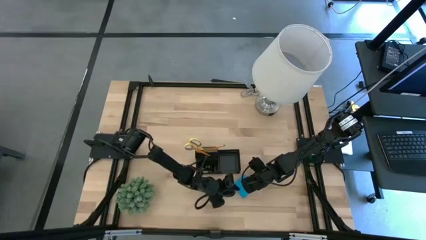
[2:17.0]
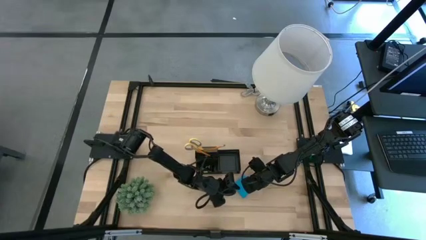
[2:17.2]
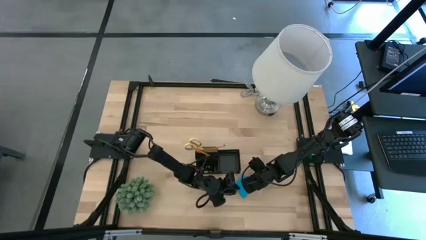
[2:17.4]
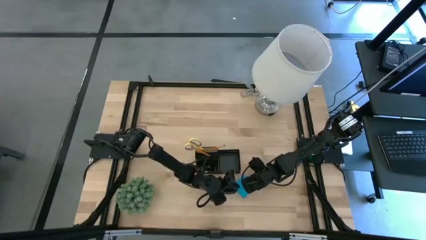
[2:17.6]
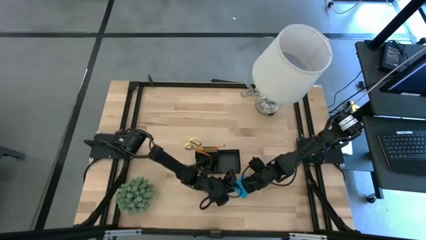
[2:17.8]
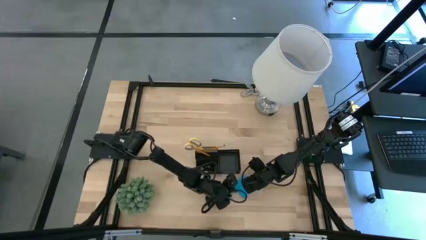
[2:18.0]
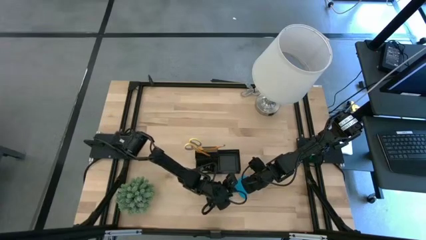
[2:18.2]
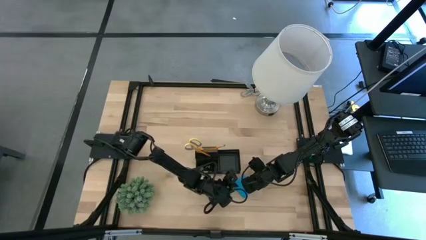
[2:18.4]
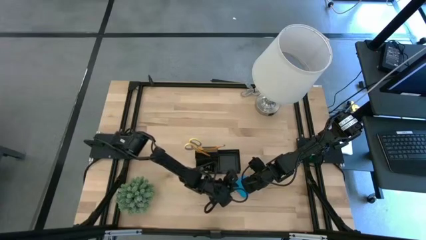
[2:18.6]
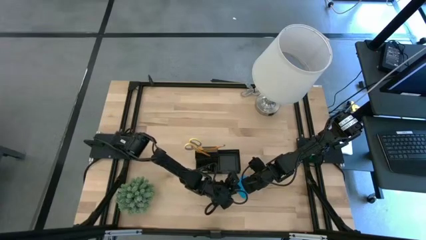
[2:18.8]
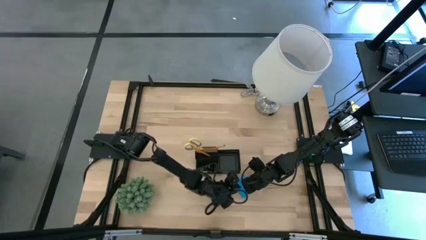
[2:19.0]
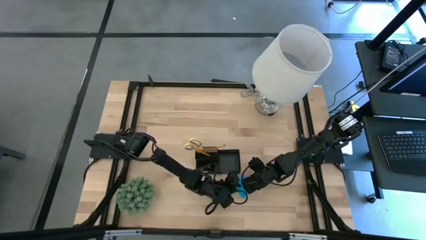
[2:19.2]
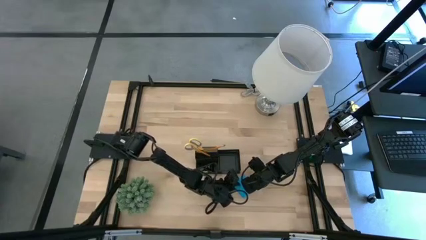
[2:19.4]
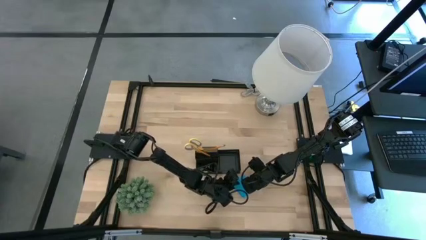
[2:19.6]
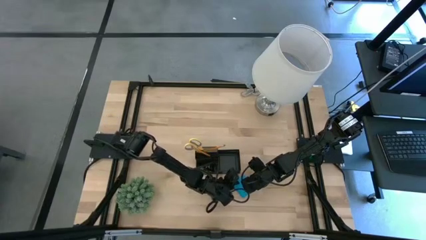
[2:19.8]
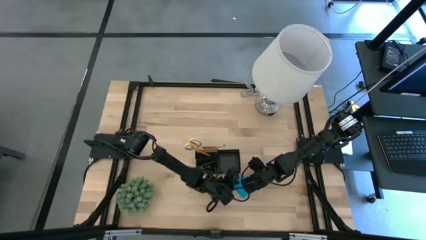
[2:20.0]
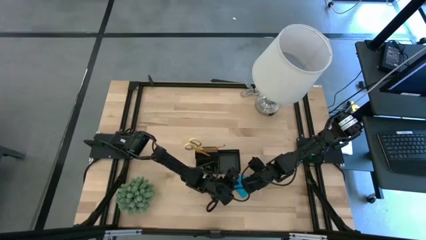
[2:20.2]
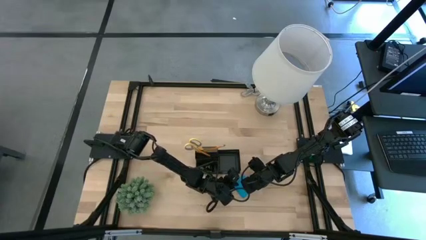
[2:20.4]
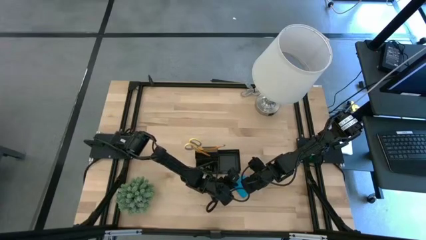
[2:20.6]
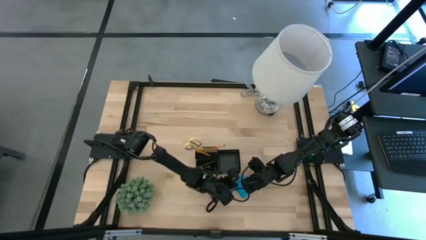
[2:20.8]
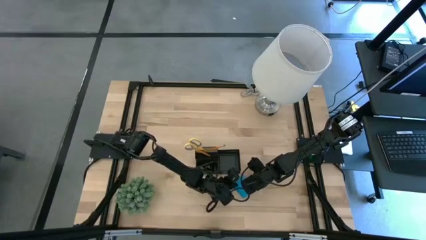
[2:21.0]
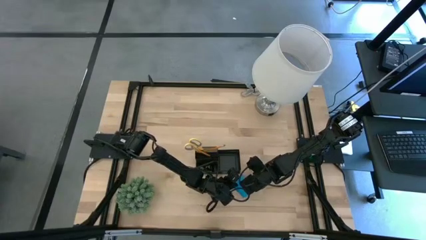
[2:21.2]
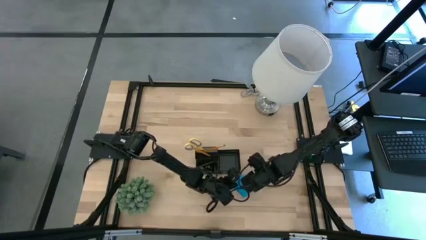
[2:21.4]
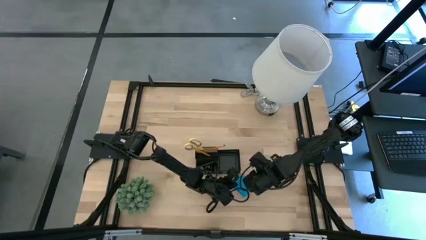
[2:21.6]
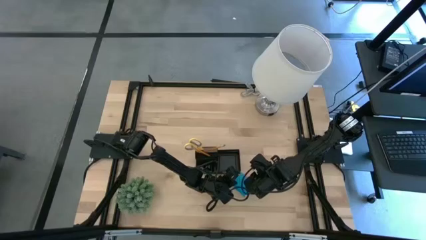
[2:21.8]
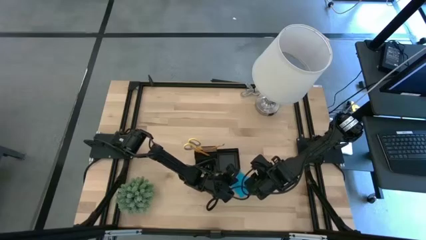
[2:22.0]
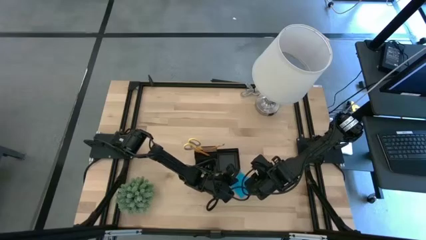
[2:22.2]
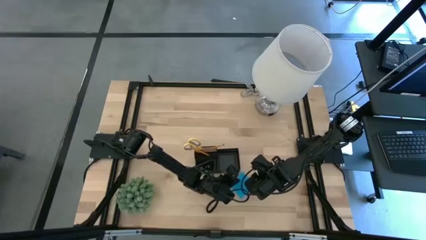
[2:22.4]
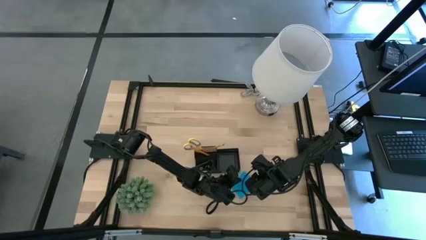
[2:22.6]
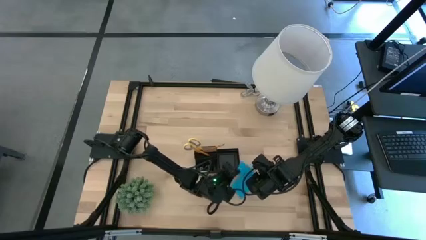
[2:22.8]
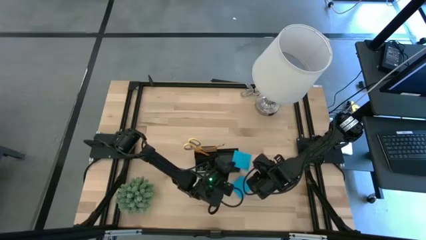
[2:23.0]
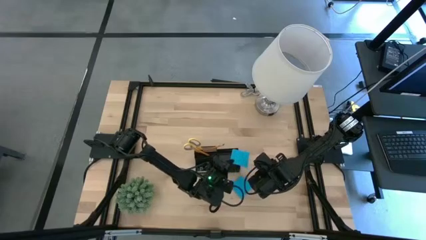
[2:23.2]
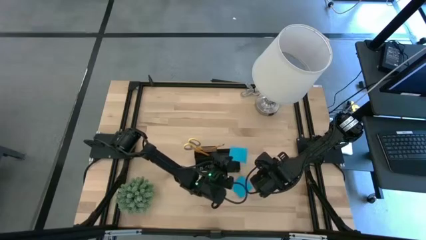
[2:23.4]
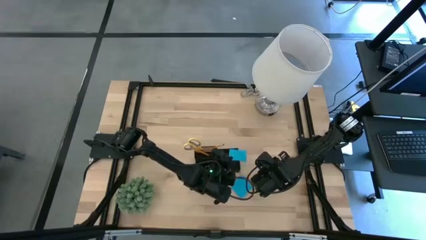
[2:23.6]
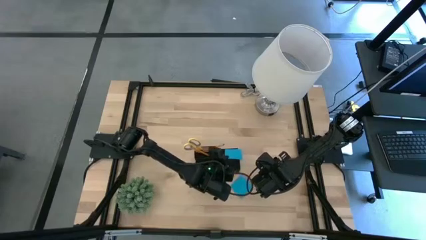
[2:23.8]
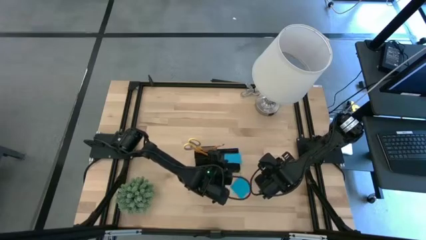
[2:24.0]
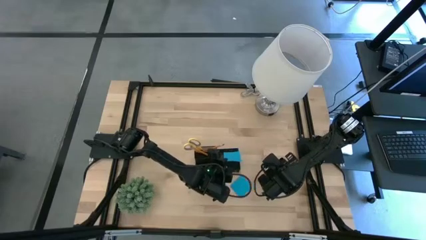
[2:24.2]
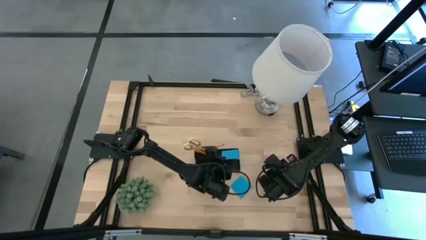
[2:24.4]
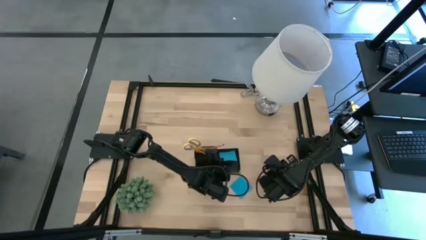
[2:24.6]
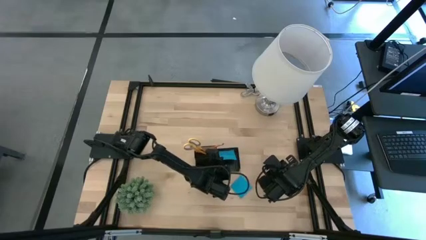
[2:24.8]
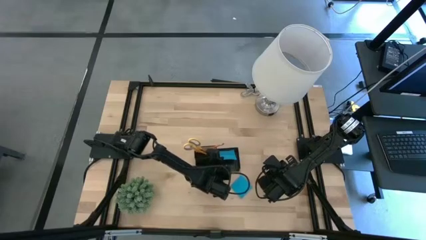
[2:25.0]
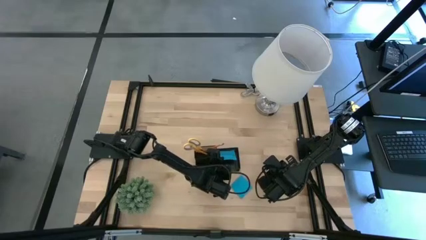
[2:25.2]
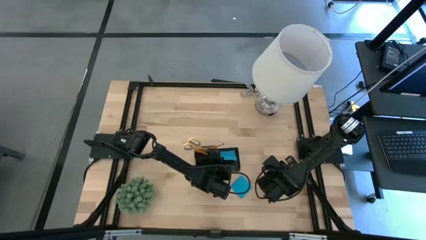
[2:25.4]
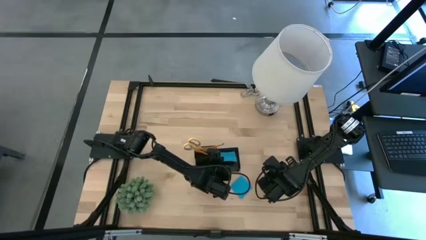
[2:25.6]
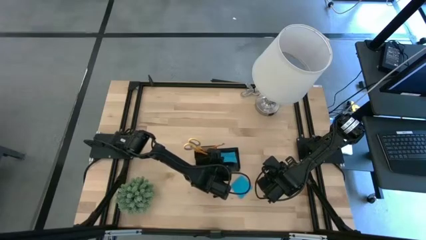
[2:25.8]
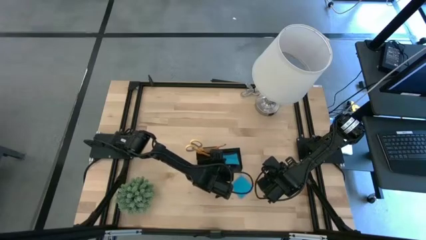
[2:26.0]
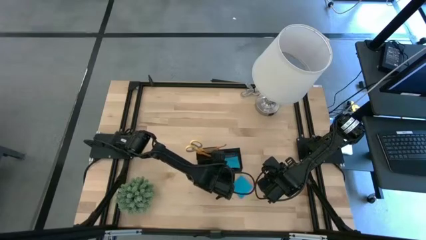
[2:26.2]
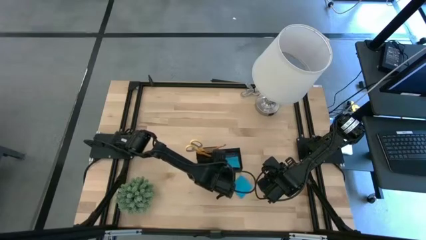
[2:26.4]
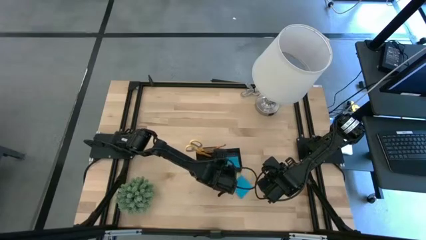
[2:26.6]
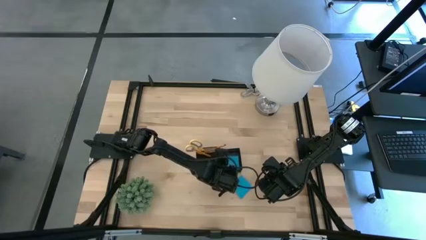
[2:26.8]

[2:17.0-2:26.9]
Task: Pick and place office supplies into organizer
Put the blue sticky notes into the desk organizer

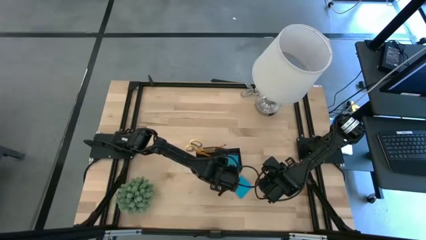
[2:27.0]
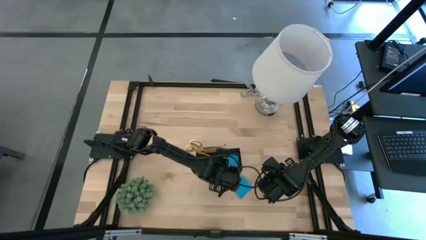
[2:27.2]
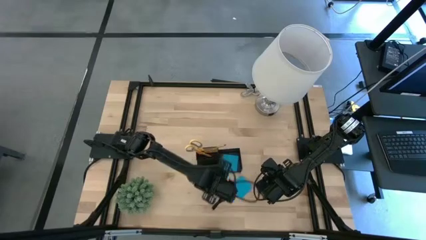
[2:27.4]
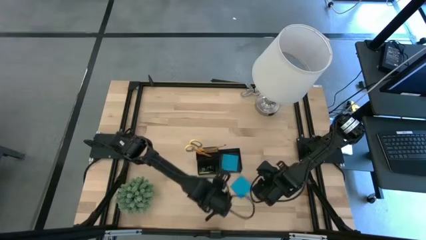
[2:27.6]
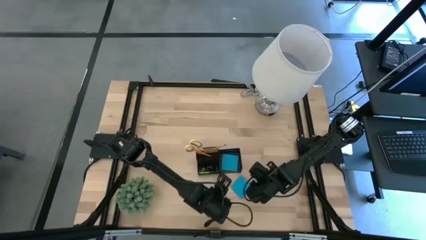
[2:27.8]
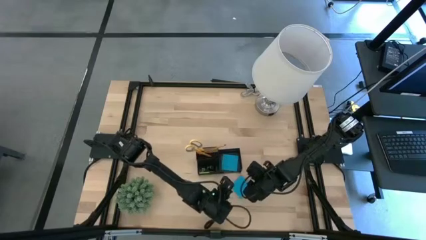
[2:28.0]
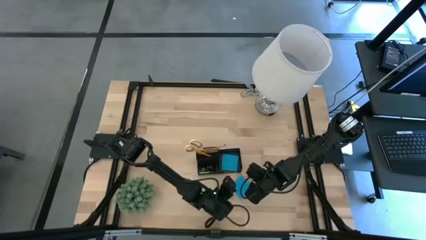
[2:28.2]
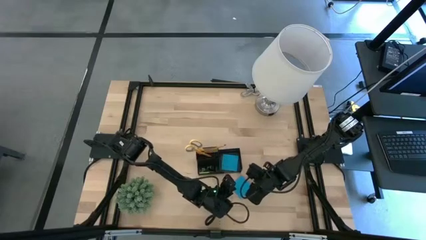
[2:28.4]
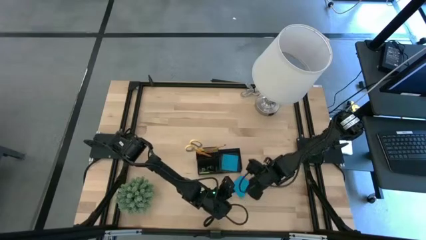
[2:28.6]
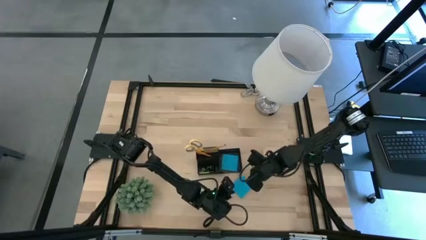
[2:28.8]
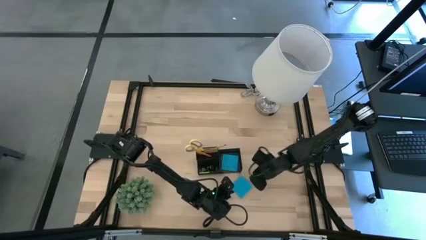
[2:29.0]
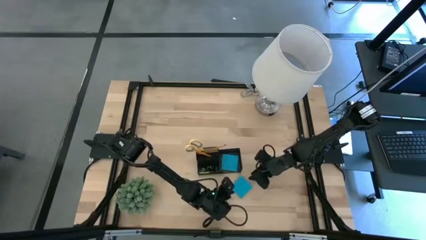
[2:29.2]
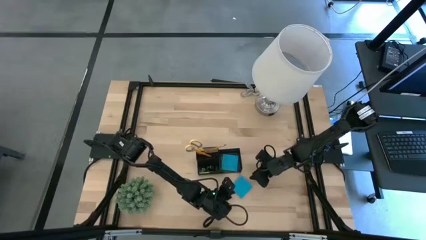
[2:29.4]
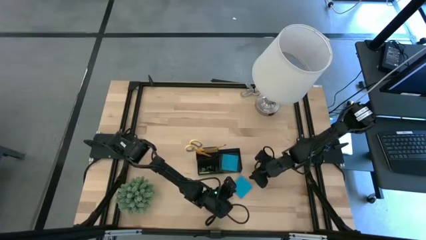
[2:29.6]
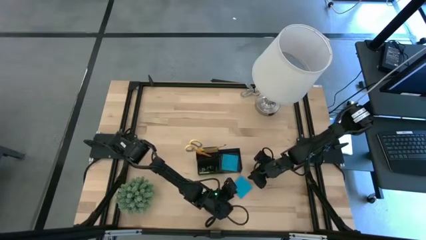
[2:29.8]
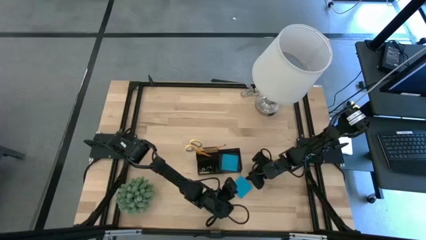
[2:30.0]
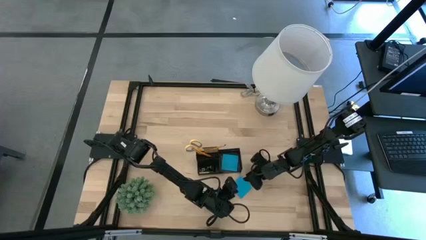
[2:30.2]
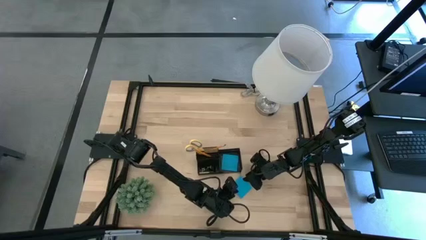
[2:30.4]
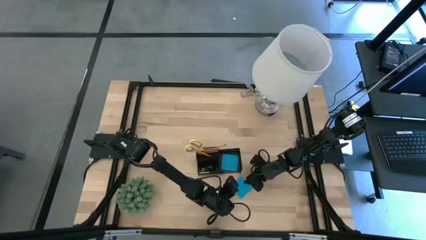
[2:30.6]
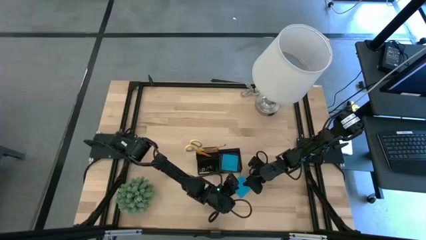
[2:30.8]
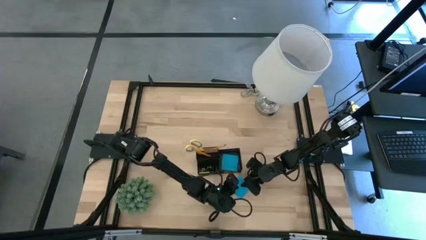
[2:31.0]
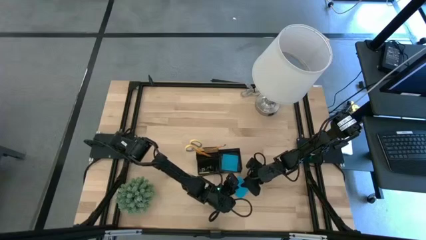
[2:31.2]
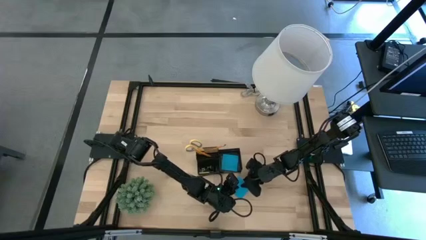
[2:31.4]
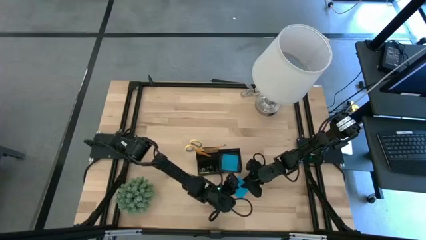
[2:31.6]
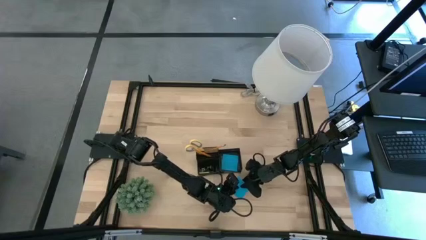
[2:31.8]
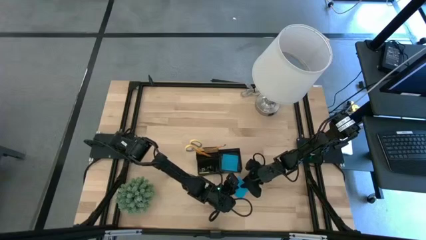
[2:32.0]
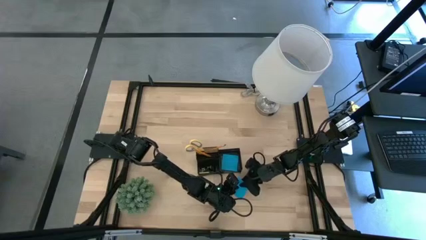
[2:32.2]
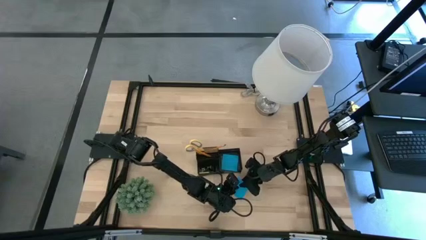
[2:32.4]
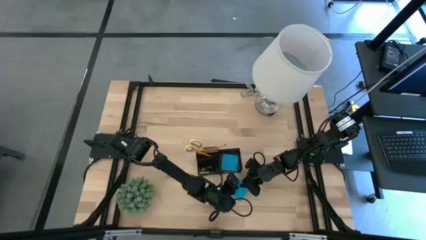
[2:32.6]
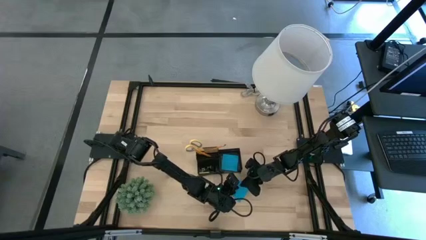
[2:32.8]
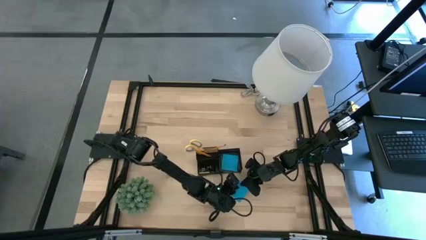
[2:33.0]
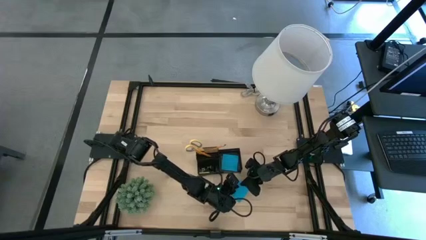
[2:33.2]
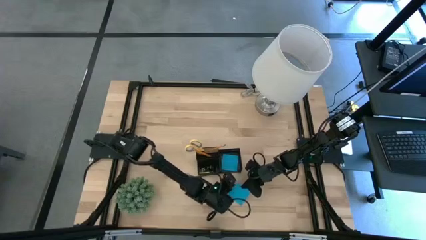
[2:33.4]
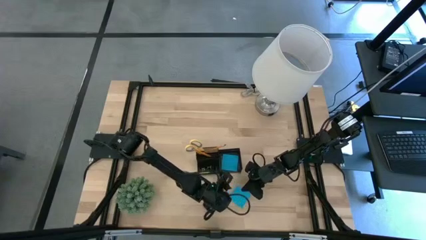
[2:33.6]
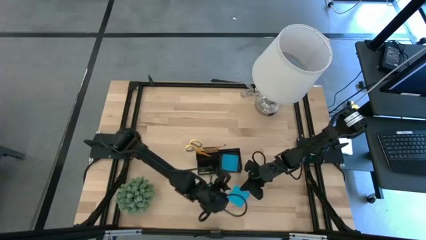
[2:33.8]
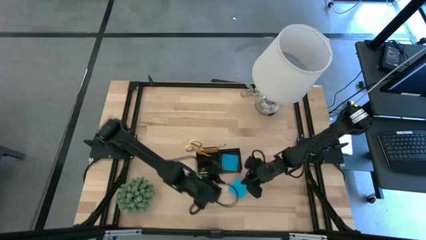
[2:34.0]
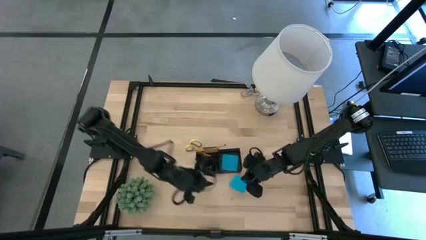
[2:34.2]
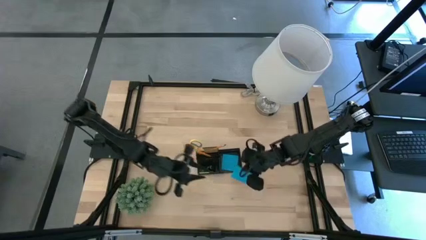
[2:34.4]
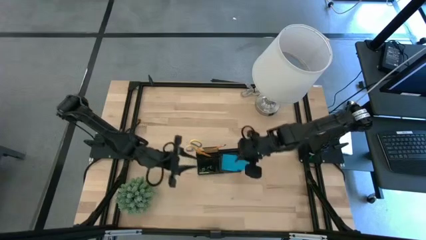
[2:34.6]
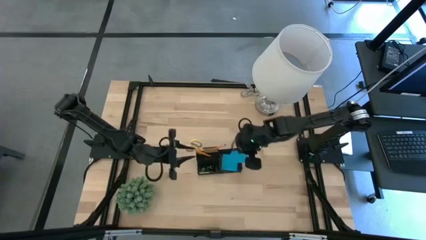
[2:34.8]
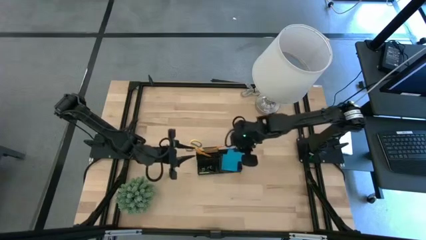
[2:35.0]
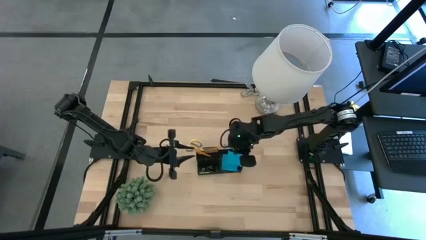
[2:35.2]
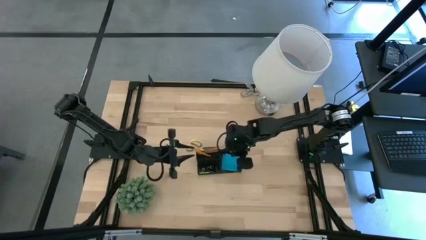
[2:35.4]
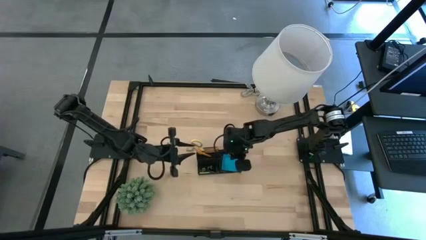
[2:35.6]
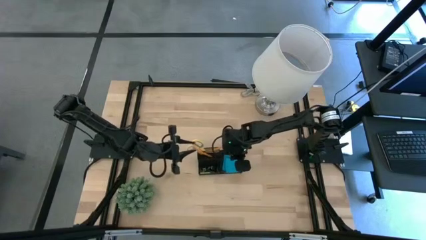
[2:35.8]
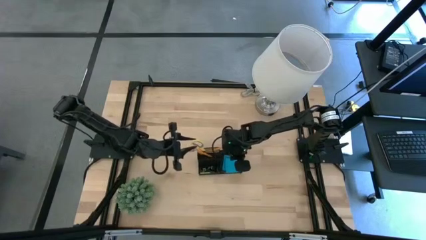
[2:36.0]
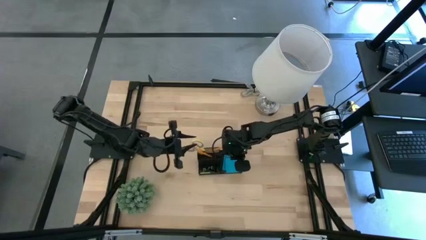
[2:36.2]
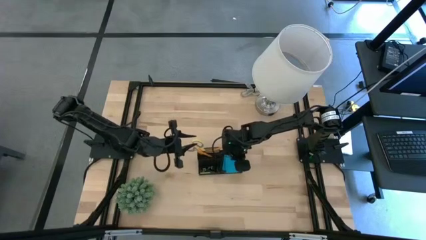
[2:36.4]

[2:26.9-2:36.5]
Put the blue sticky notes into the desk organizer
